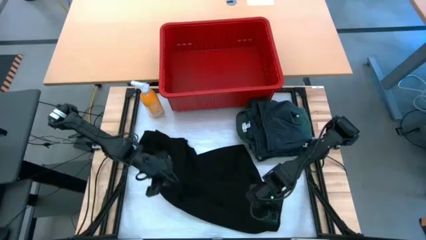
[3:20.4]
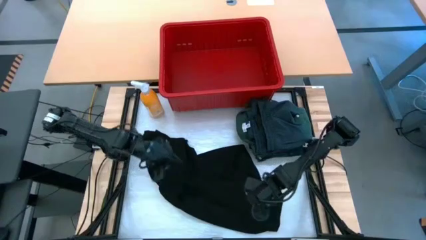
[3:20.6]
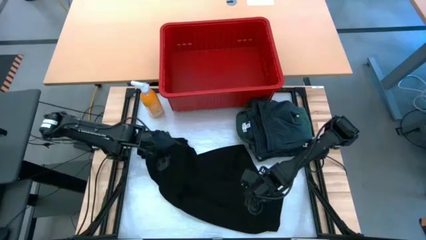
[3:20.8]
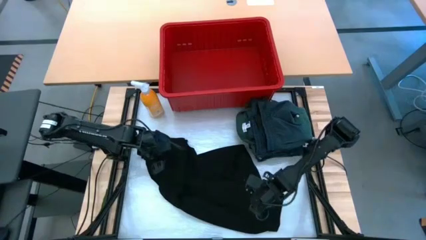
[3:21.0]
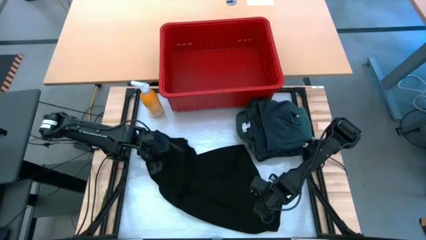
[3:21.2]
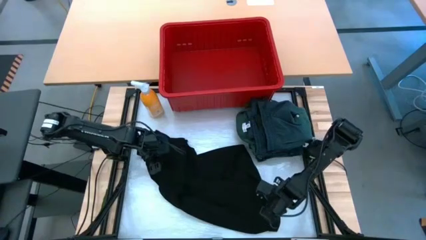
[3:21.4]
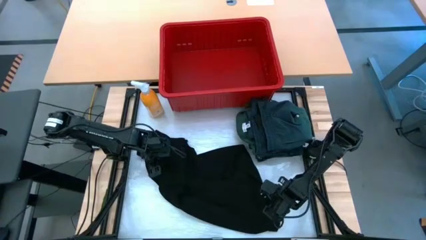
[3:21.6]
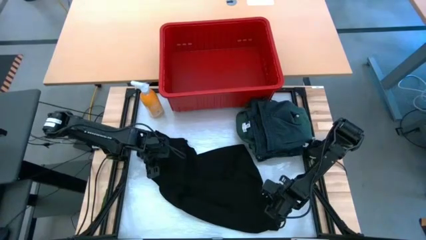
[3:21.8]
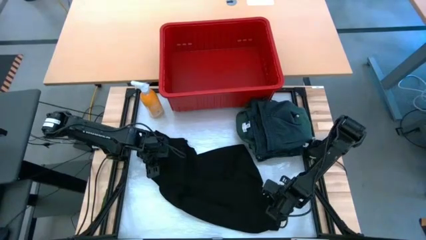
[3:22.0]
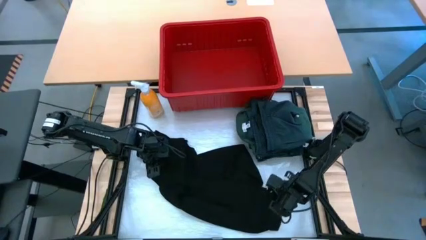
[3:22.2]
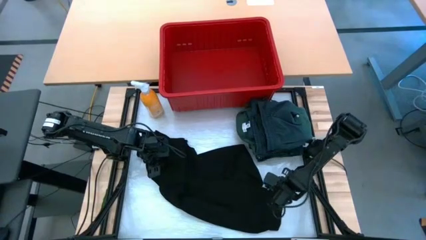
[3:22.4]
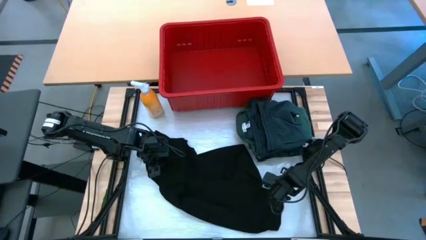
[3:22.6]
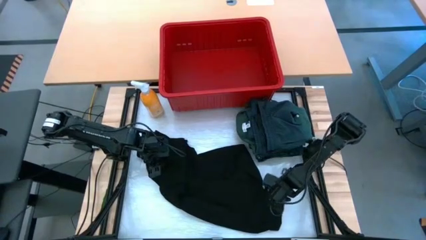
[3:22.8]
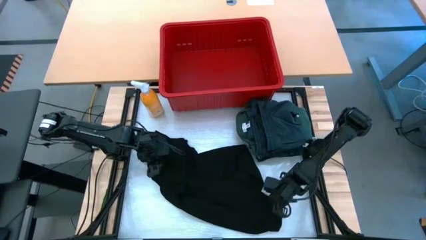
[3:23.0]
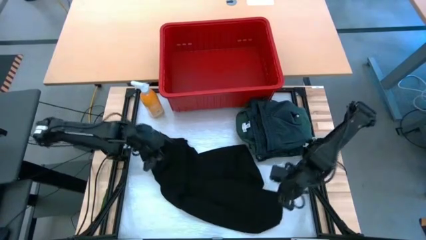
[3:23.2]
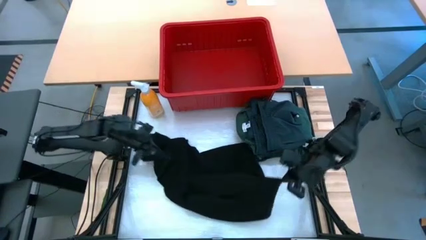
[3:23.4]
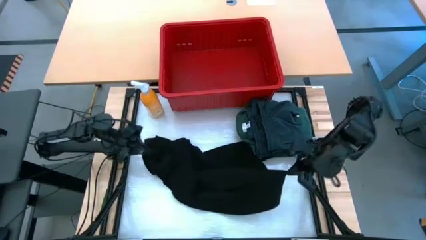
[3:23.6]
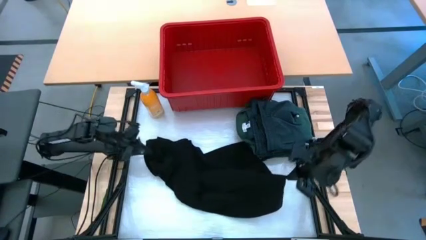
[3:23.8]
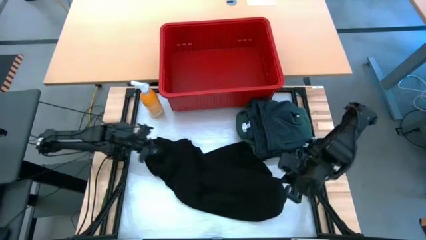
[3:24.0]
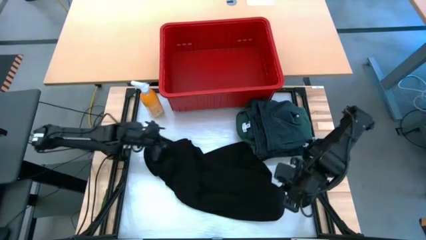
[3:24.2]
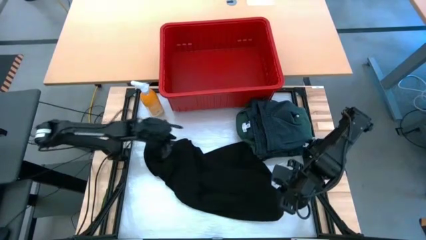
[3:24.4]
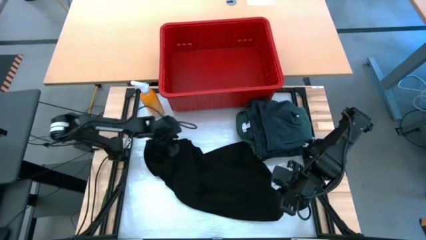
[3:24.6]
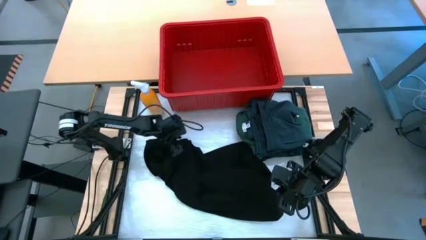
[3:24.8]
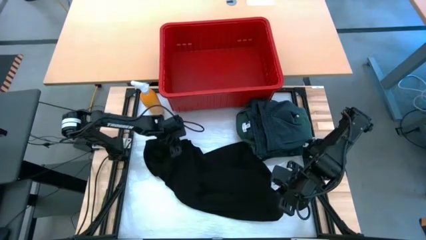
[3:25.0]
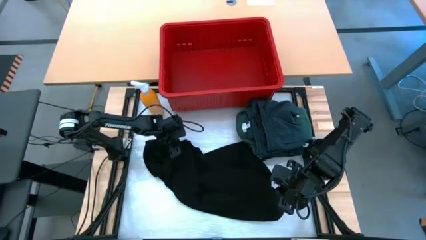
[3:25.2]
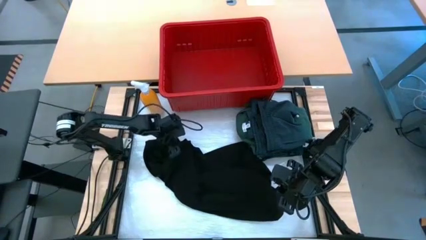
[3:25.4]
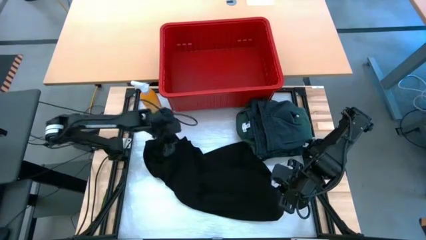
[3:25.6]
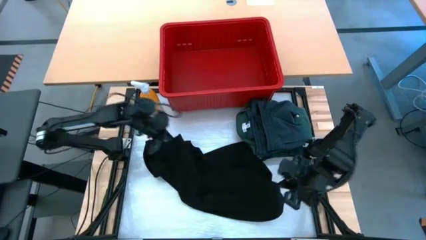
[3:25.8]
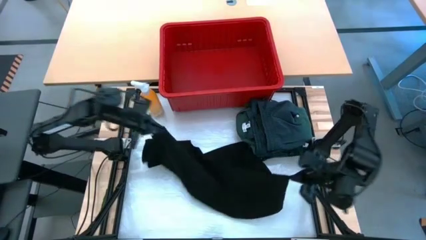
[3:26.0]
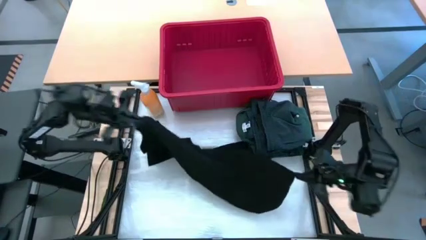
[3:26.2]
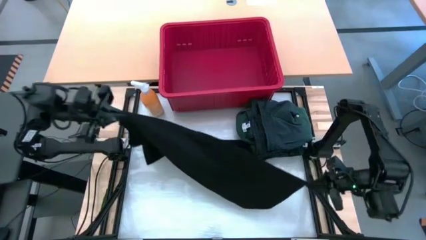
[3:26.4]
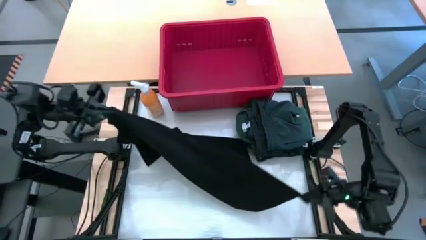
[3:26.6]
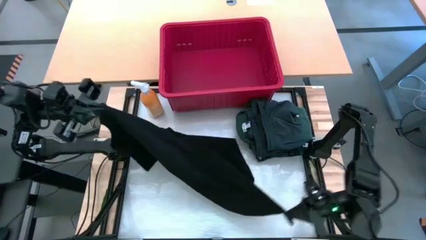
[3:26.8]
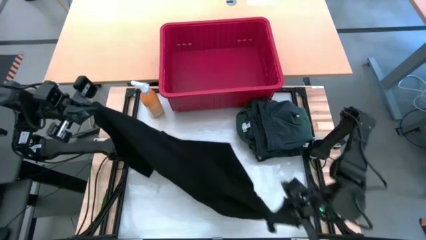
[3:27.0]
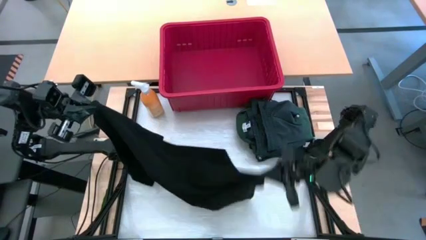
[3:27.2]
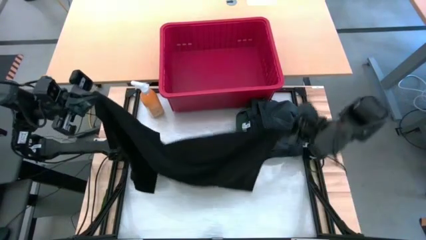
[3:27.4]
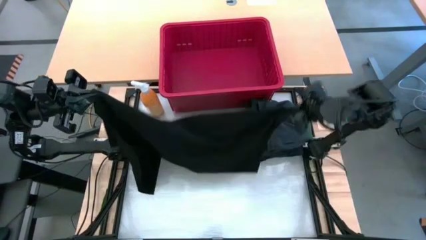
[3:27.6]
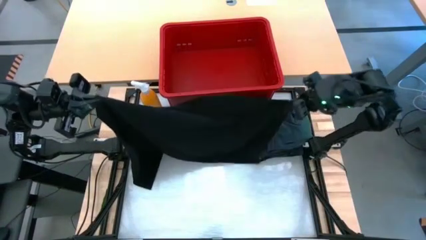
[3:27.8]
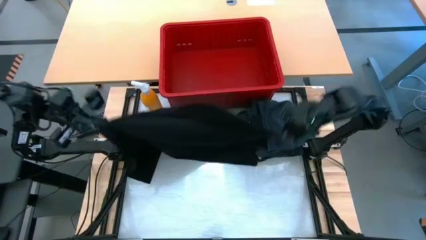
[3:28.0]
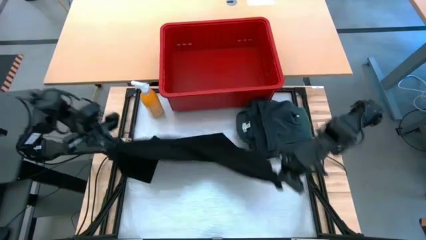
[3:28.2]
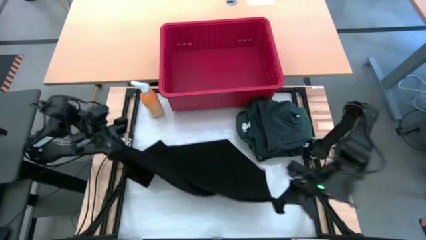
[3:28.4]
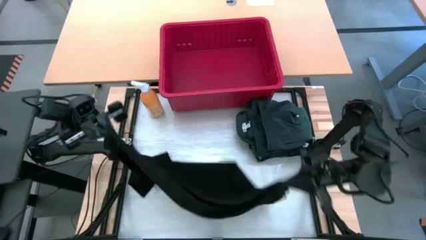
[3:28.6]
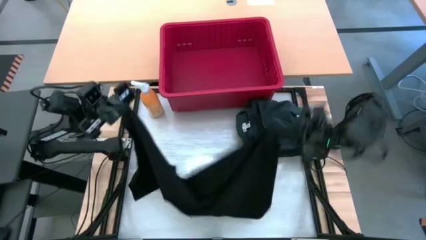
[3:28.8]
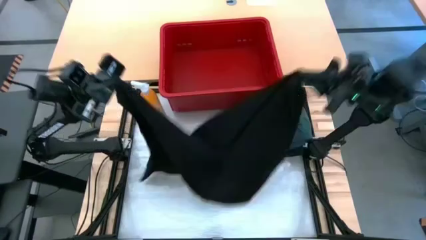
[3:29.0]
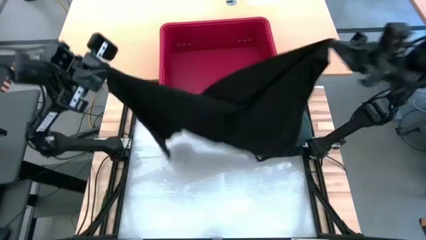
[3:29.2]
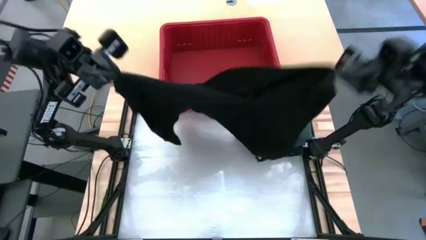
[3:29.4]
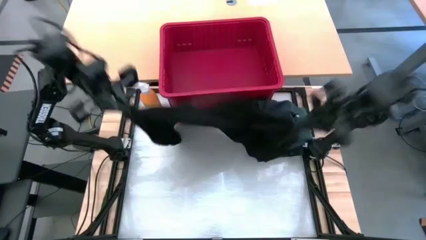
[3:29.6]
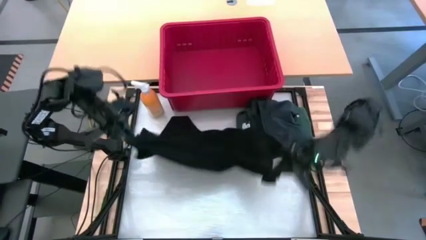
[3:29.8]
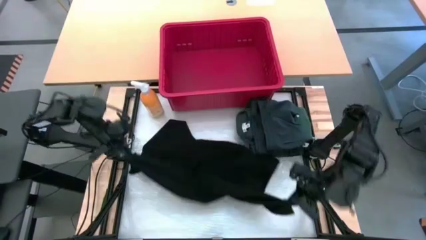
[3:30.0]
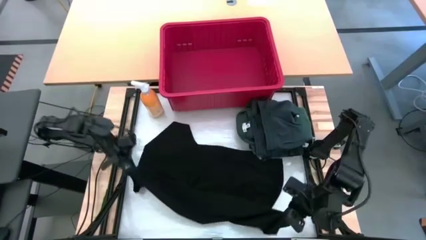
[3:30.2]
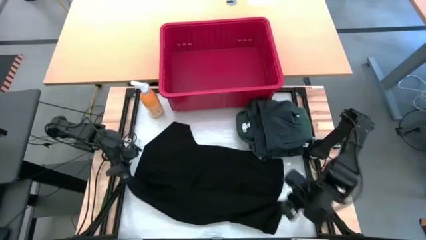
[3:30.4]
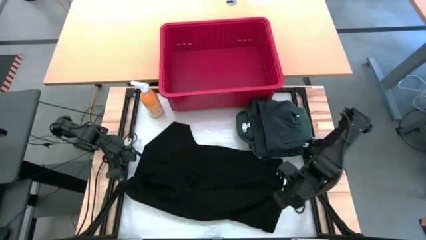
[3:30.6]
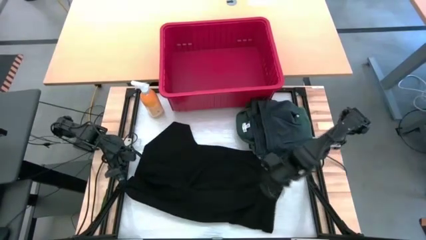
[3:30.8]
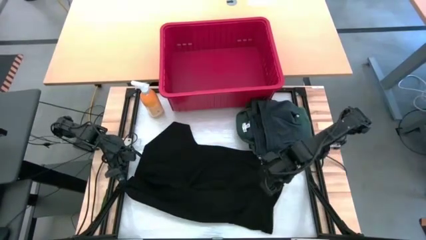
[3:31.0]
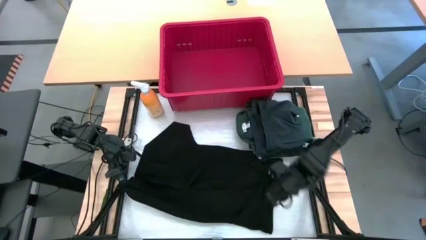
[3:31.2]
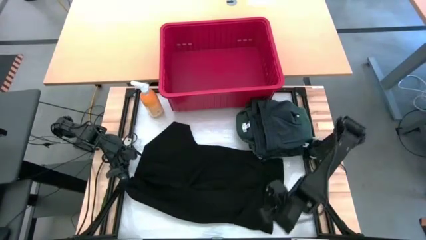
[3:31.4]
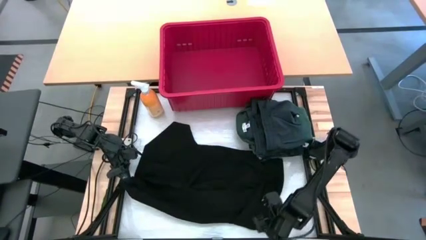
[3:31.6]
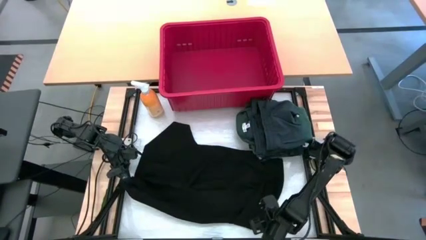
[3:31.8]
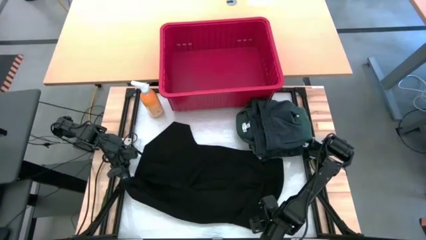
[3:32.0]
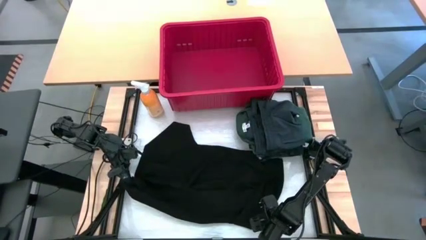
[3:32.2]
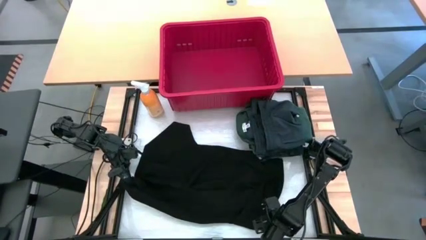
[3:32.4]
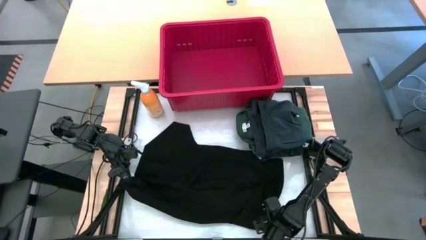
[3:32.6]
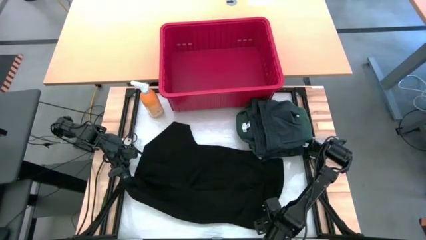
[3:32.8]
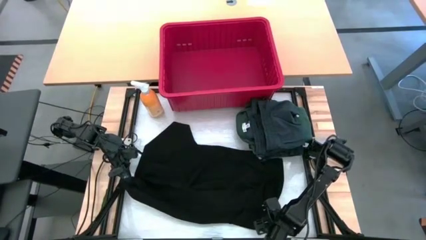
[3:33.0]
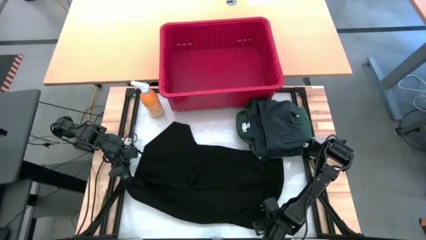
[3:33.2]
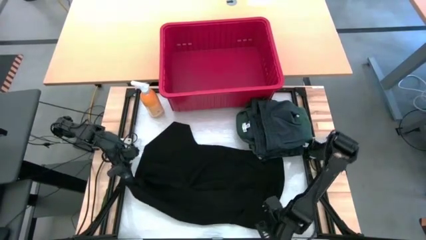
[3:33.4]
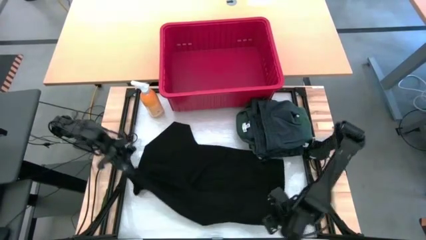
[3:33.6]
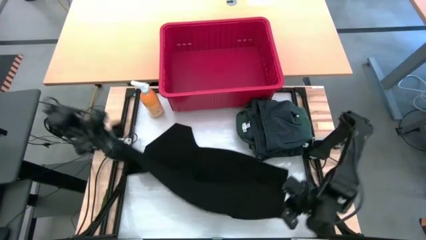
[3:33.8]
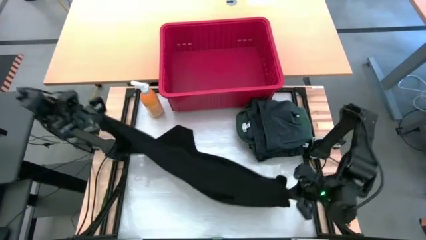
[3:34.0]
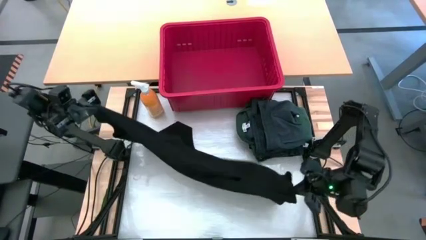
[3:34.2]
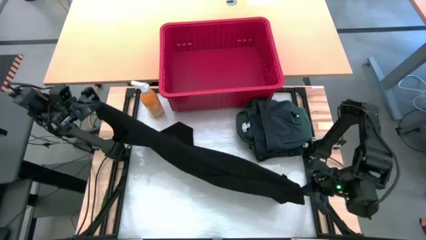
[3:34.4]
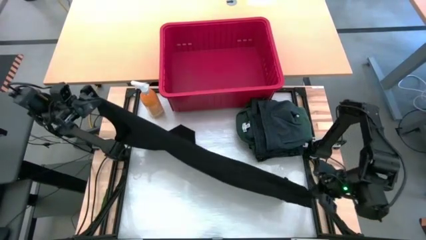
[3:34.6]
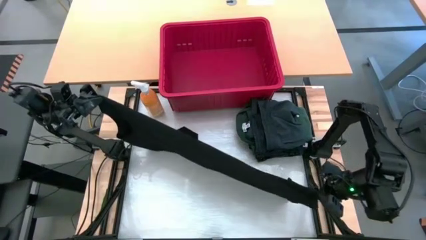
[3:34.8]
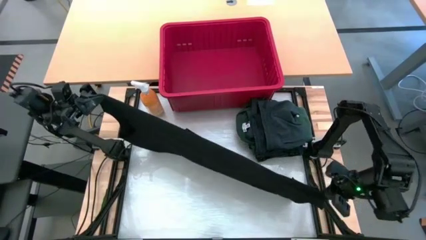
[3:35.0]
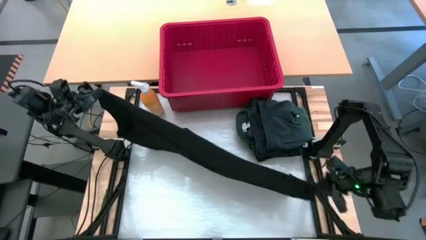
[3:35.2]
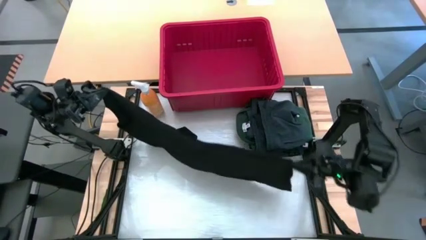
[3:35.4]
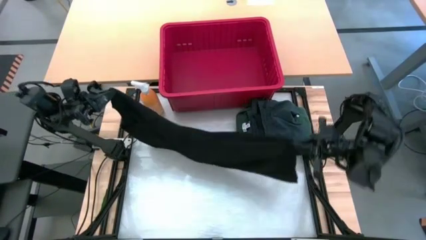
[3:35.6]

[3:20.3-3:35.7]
Task: Fold Laundry from Bin
Fold the black shirt
